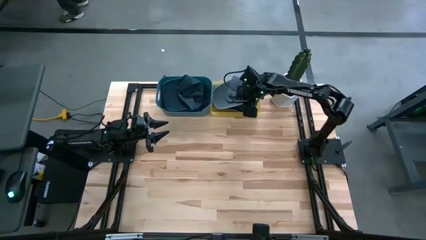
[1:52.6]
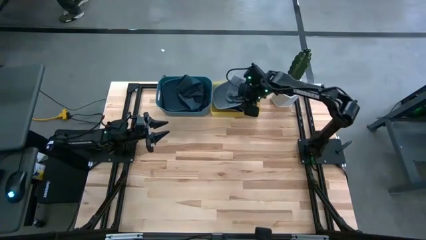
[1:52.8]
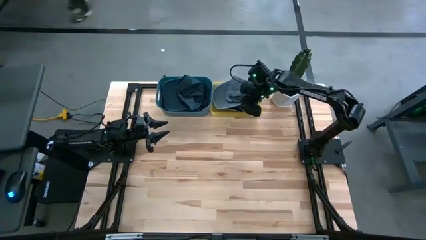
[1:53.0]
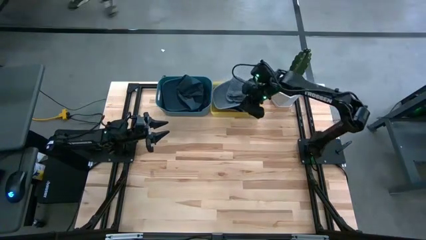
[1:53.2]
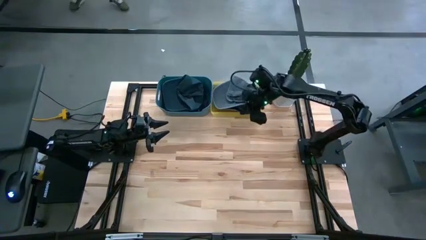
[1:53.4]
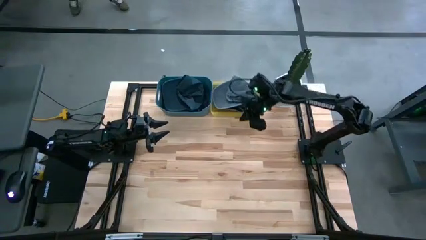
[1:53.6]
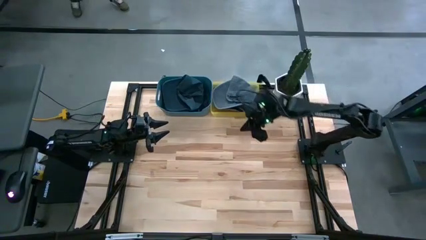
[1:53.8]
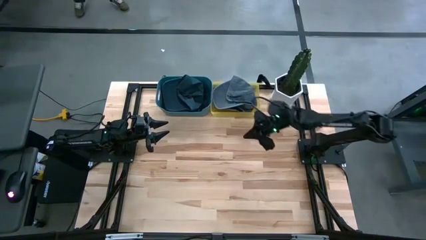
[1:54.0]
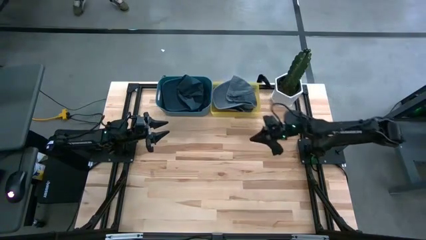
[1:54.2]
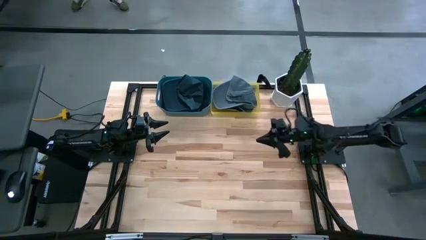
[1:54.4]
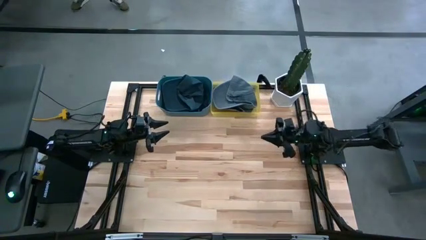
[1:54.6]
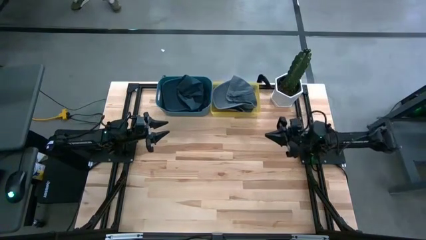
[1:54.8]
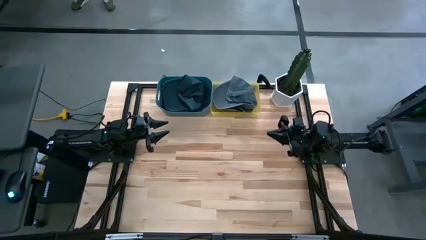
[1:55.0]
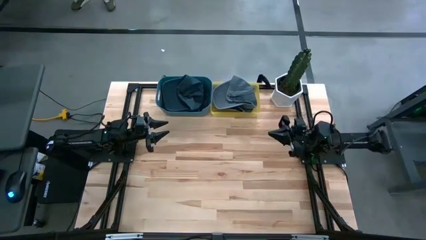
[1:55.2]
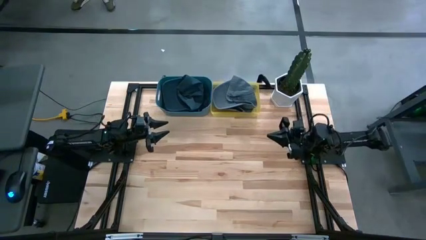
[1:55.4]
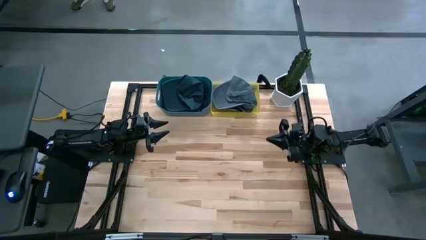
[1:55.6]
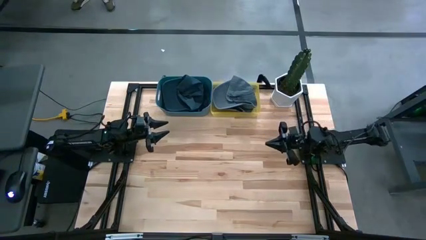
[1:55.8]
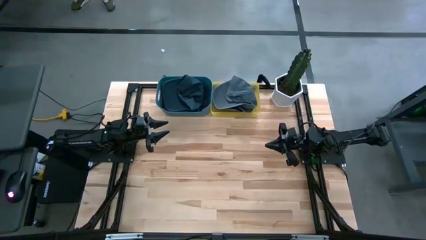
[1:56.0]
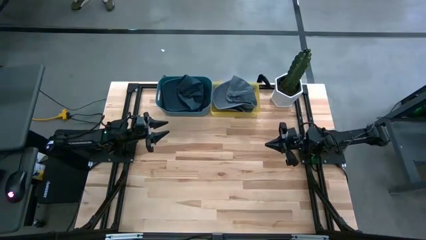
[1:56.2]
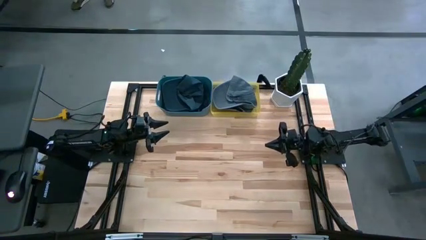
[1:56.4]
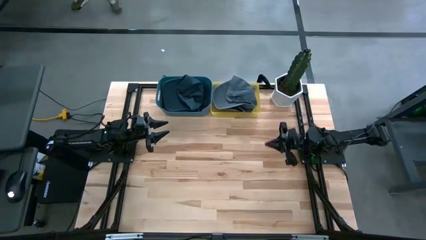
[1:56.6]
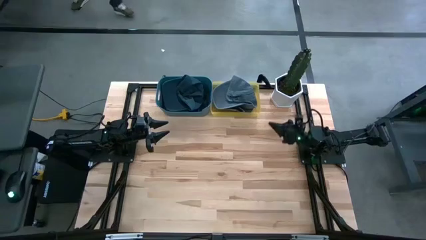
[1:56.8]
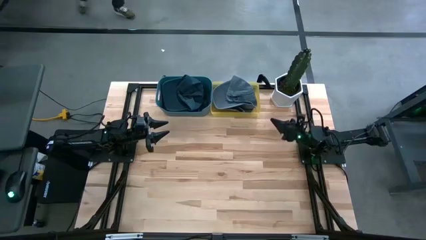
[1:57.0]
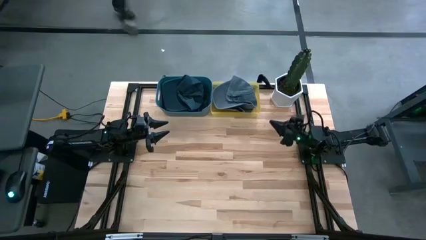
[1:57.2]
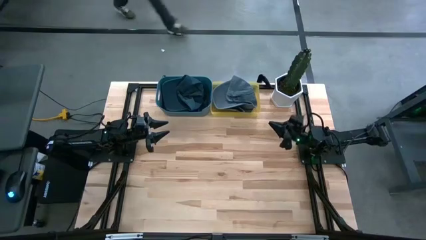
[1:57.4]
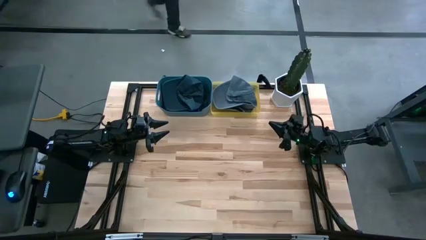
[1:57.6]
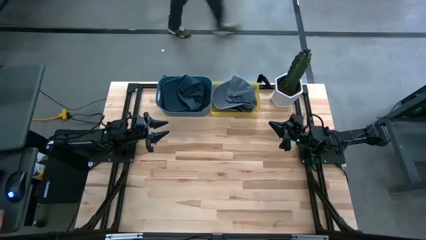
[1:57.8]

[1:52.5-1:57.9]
Task: Pick & Place hat
Return to Home Position

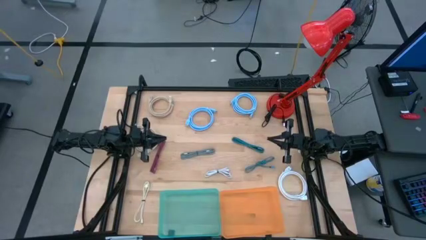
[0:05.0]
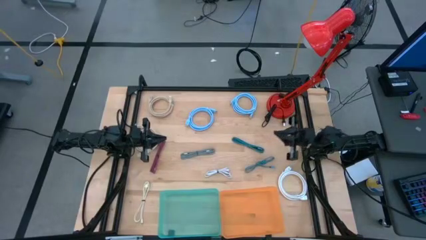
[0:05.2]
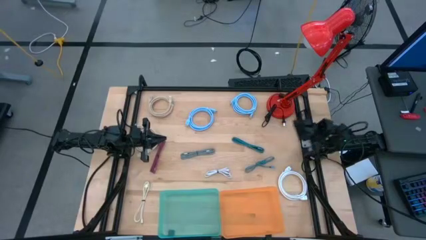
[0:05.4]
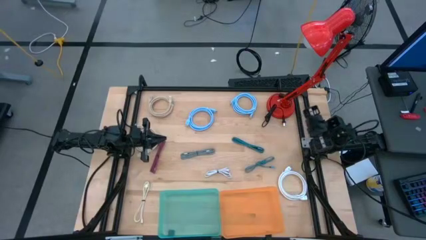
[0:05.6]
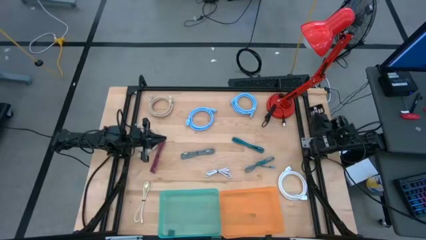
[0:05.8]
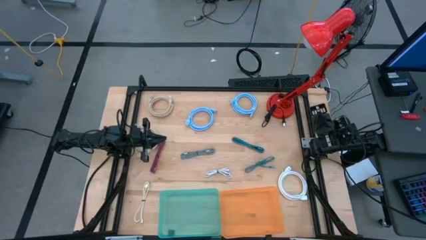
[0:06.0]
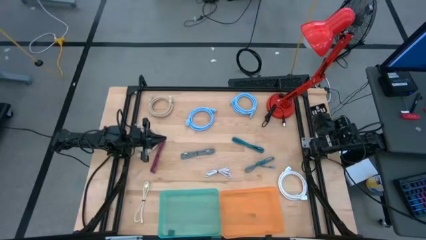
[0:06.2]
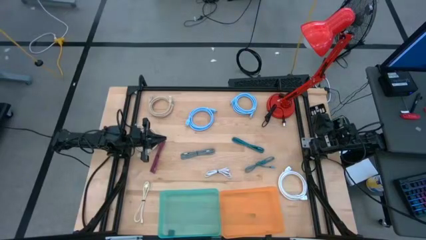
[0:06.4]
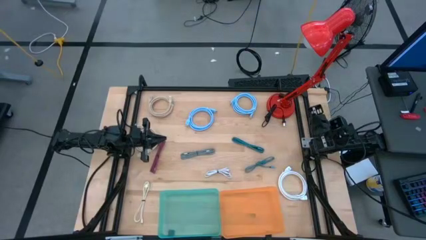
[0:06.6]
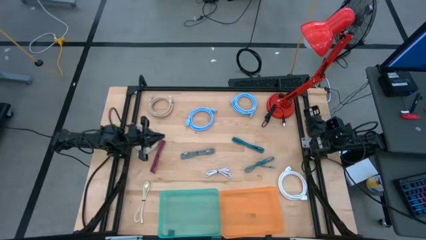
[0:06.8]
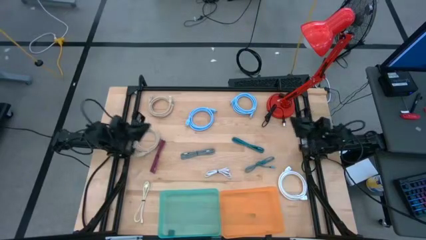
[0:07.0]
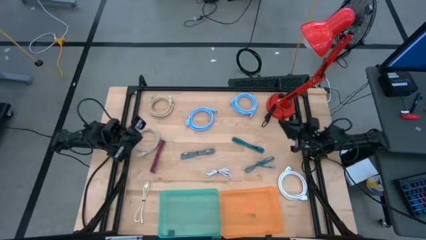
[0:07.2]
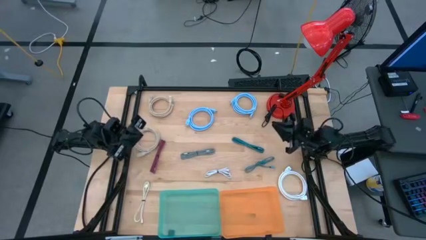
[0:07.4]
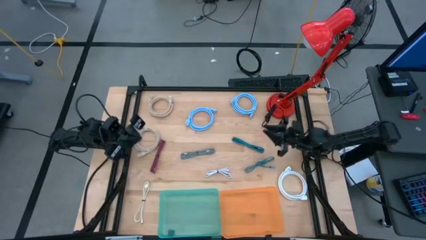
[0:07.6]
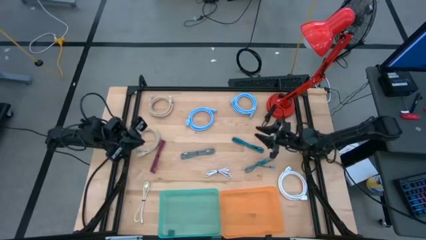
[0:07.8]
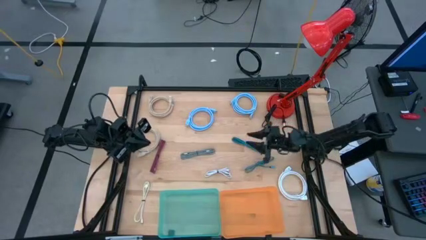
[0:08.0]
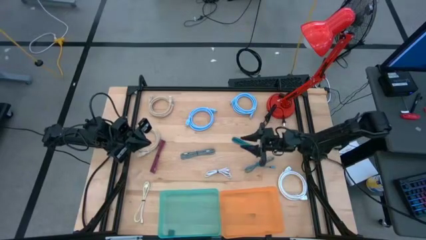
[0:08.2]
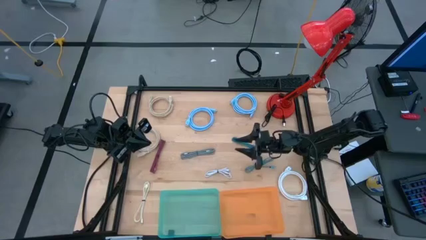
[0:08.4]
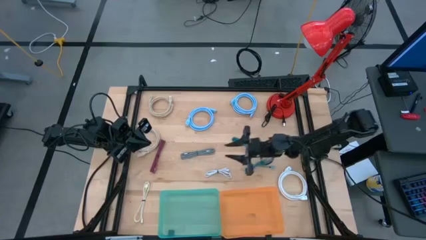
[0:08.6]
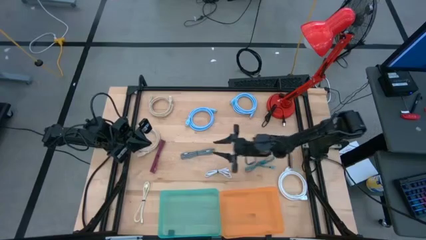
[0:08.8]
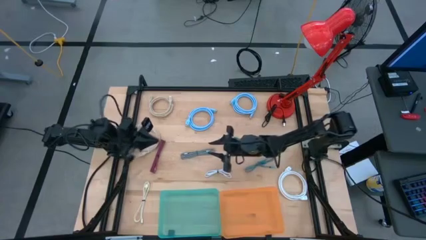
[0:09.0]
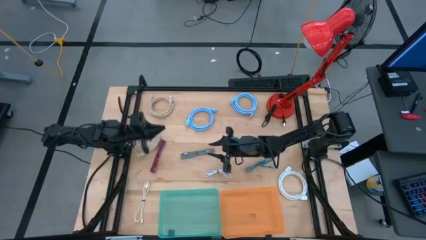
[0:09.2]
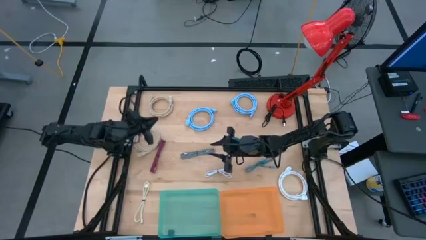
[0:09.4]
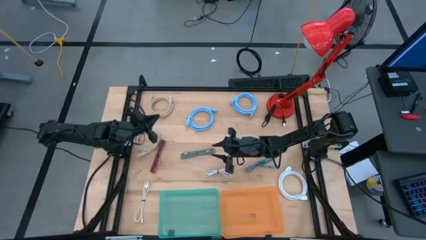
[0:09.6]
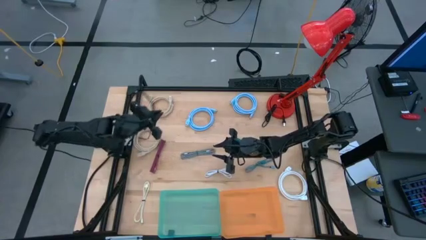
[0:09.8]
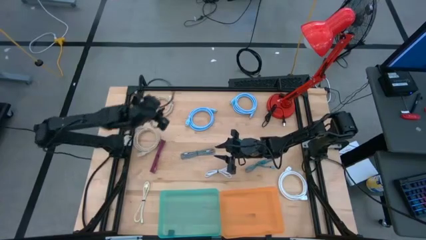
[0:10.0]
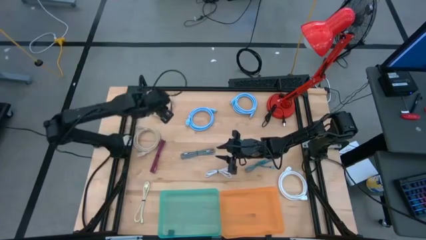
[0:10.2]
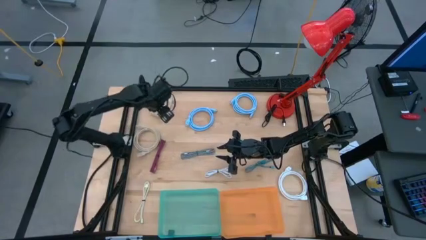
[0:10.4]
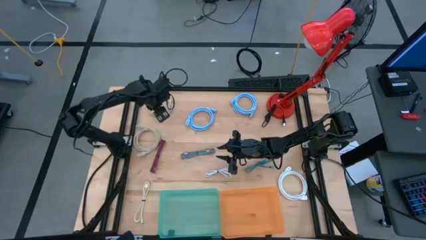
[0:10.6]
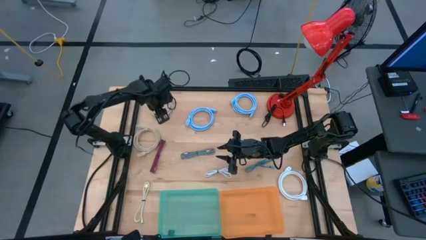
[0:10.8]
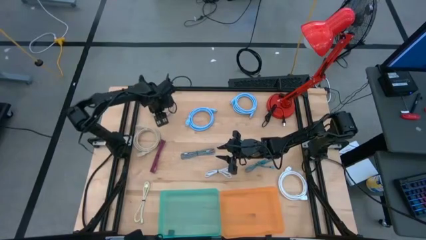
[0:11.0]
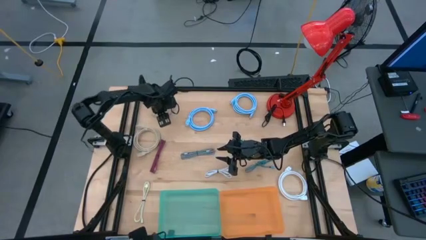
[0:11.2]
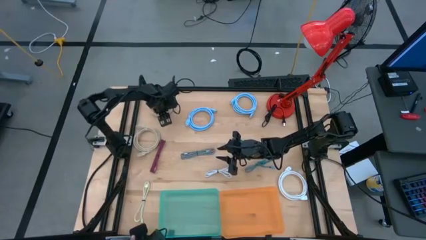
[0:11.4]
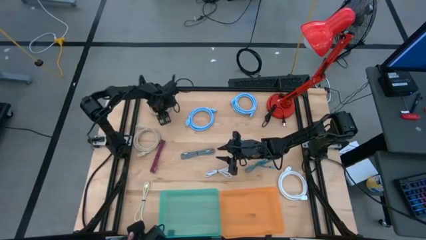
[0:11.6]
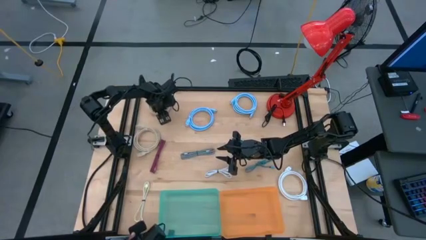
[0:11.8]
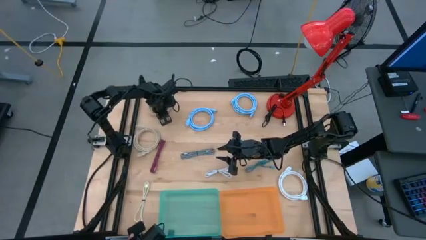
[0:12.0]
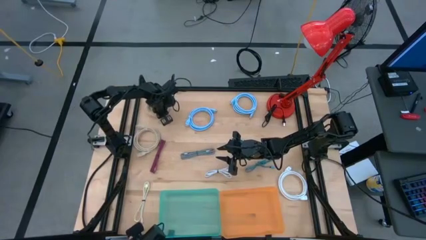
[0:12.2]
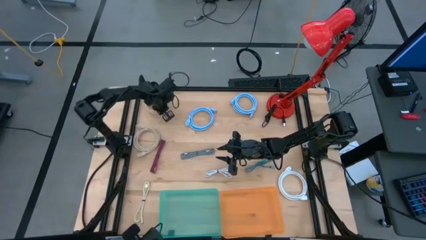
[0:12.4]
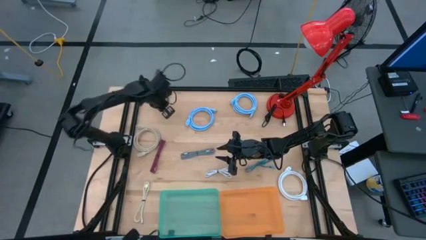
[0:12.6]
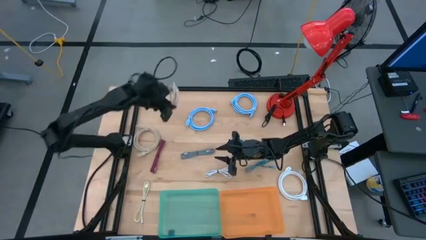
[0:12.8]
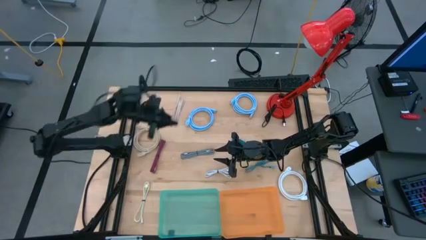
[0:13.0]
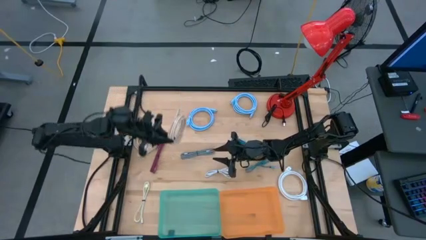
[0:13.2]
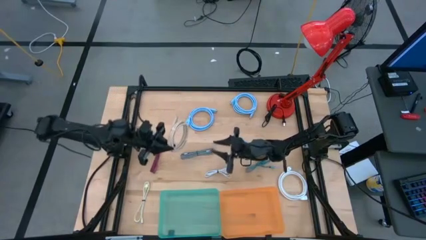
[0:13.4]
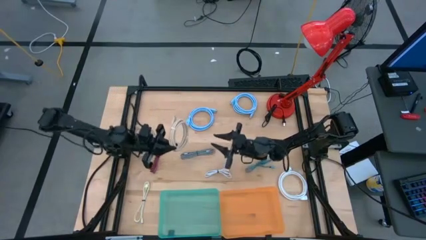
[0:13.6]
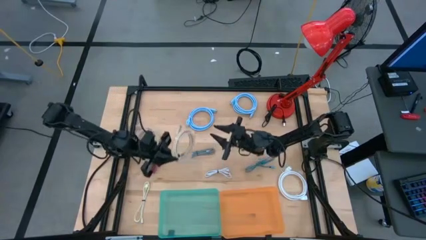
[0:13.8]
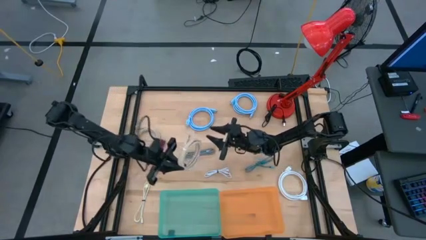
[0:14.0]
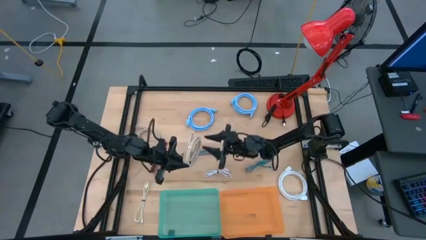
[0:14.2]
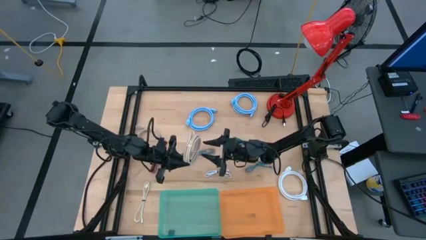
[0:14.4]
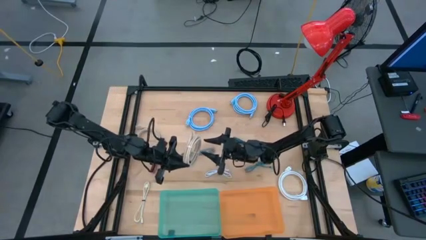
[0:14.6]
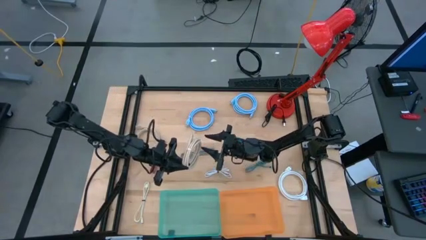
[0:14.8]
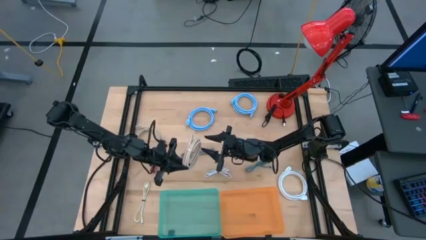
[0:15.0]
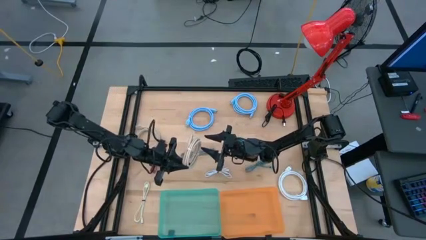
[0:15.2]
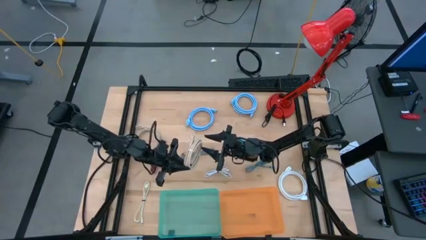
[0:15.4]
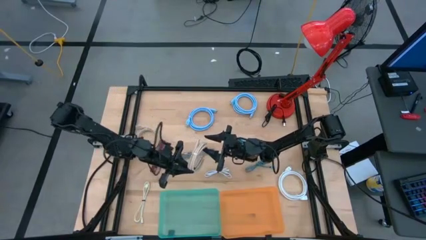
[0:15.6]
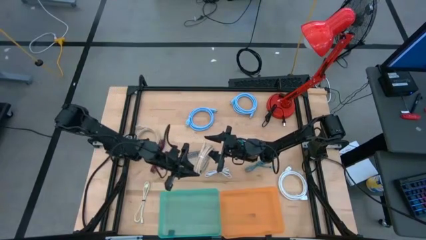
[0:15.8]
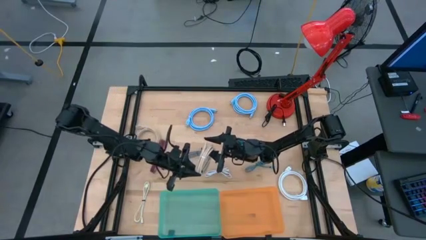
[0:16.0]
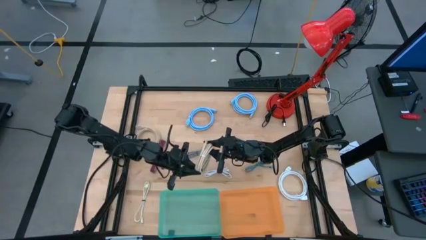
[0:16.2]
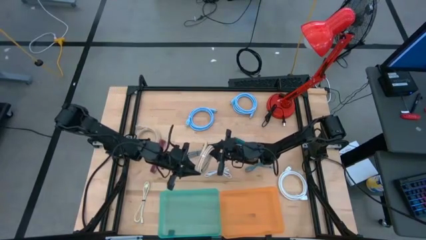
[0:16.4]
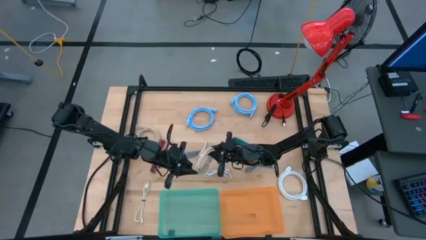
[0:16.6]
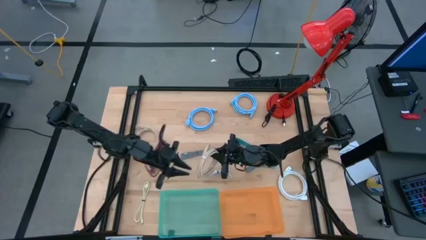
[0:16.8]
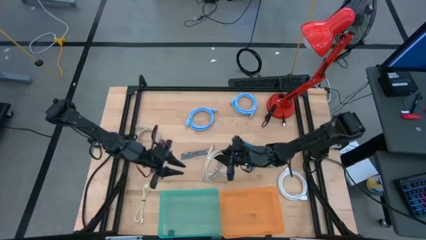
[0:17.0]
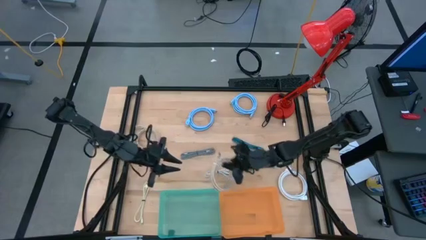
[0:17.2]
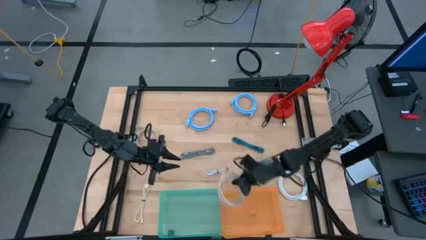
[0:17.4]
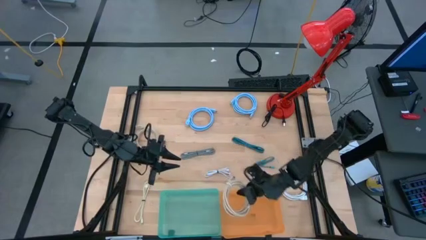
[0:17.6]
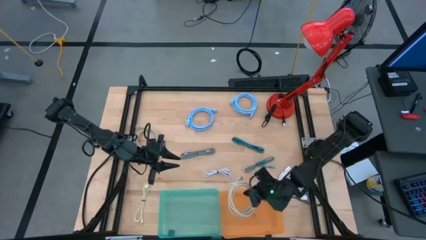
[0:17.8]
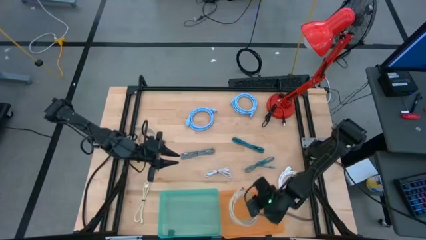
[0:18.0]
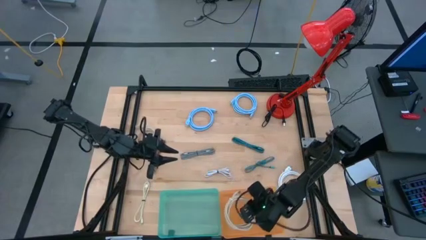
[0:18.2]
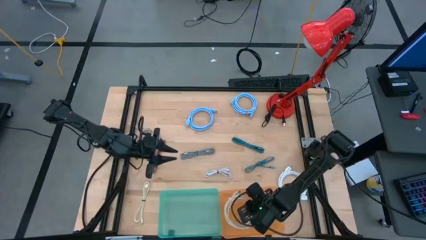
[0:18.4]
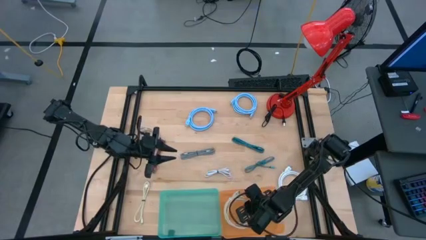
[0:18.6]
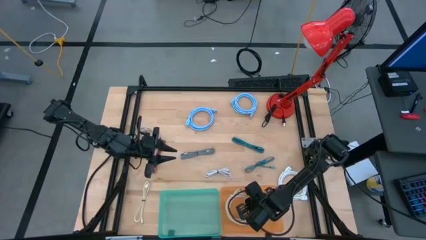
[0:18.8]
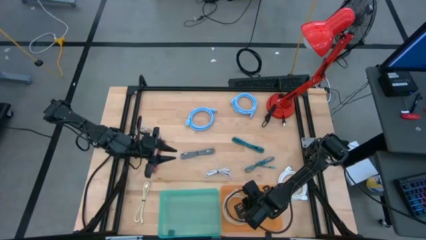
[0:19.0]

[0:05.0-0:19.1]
Task: Pick & Place USB Port
Put the top light brown HDMI cable into the orange bin
